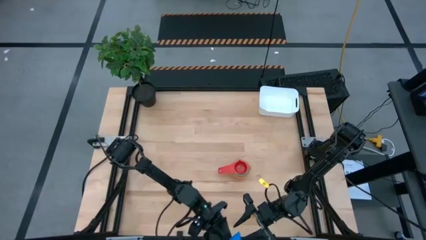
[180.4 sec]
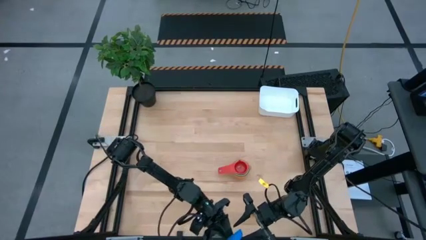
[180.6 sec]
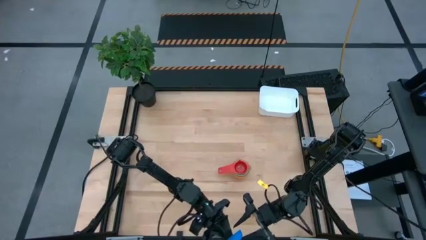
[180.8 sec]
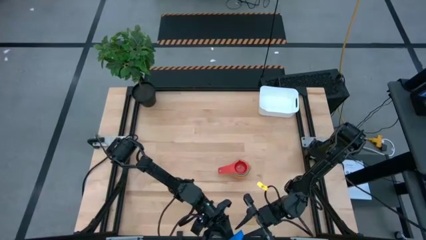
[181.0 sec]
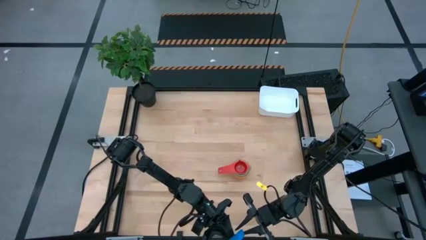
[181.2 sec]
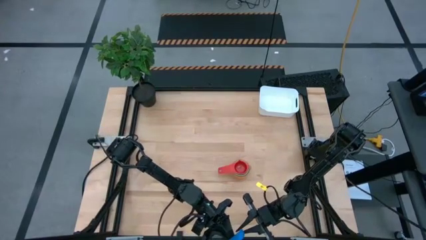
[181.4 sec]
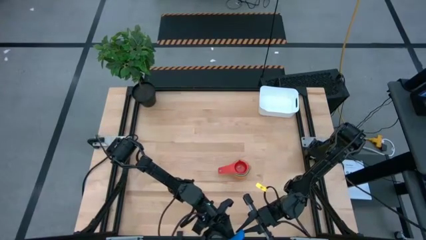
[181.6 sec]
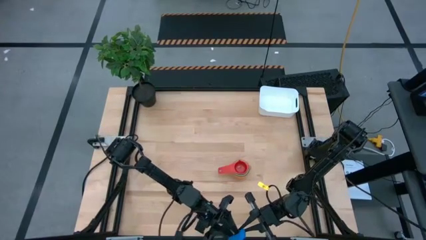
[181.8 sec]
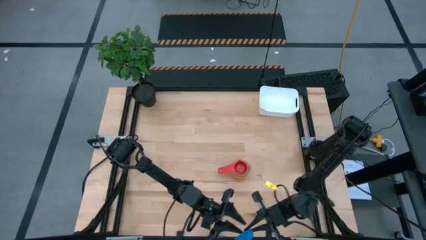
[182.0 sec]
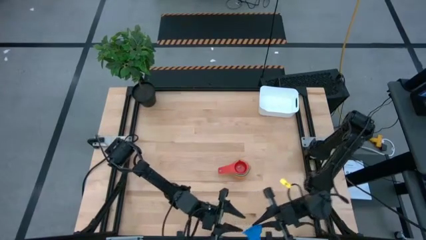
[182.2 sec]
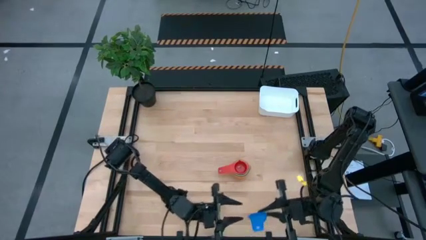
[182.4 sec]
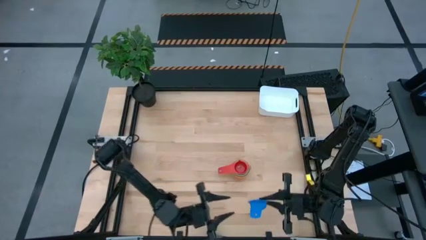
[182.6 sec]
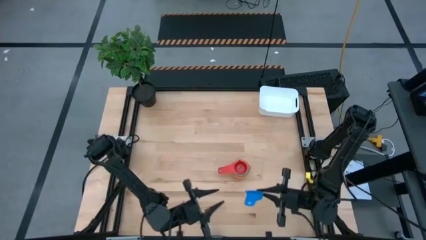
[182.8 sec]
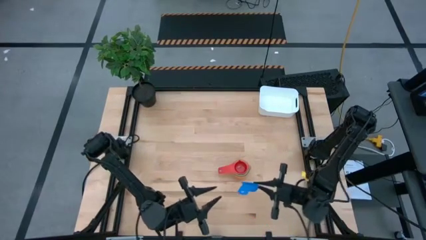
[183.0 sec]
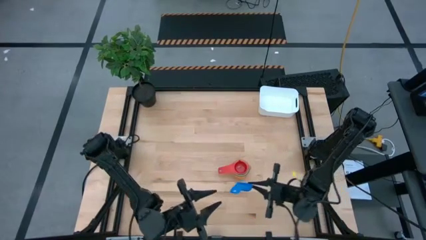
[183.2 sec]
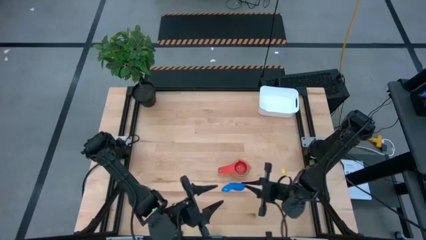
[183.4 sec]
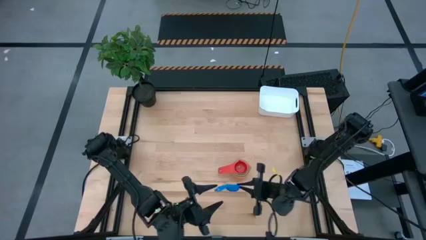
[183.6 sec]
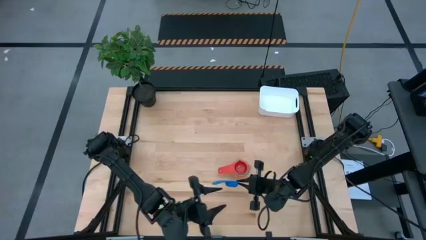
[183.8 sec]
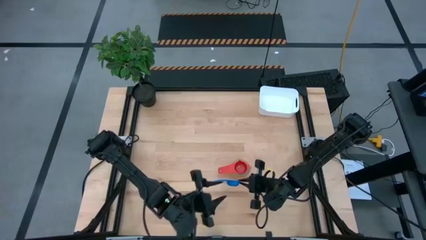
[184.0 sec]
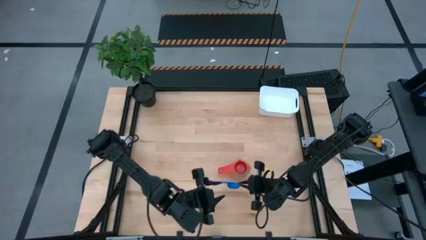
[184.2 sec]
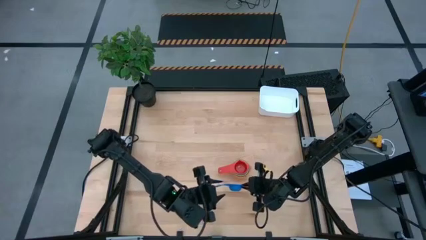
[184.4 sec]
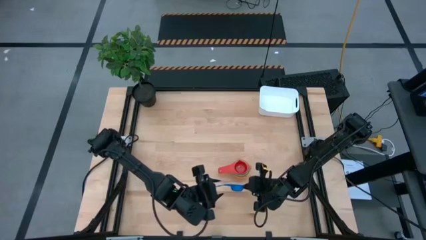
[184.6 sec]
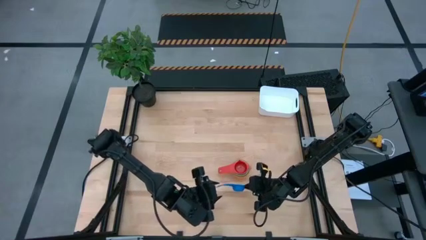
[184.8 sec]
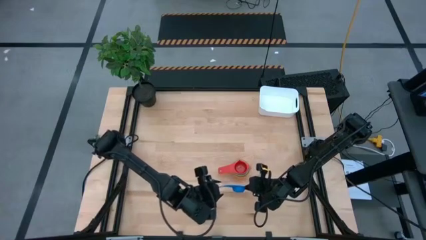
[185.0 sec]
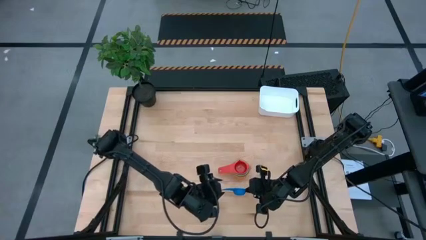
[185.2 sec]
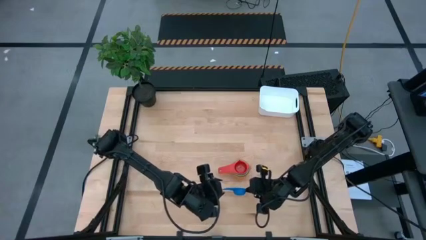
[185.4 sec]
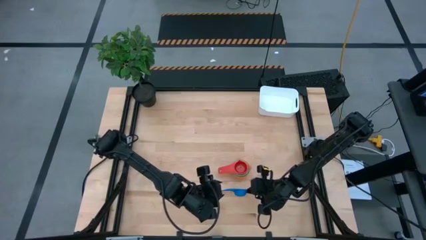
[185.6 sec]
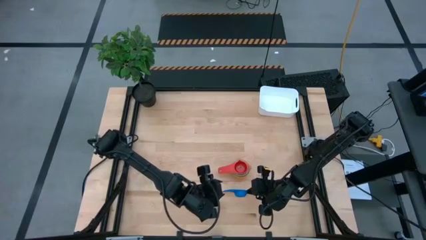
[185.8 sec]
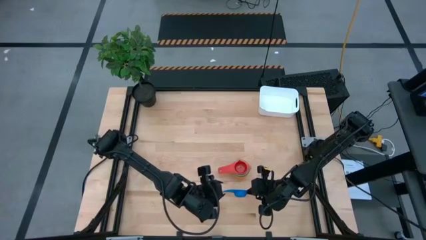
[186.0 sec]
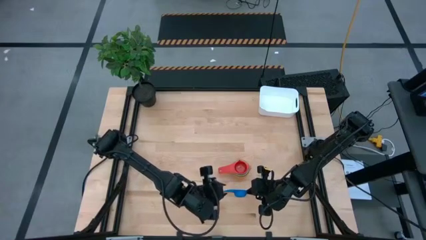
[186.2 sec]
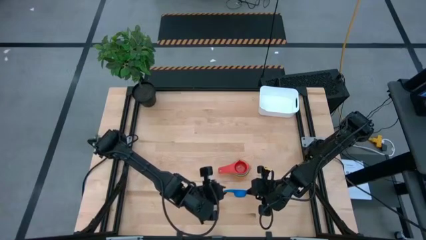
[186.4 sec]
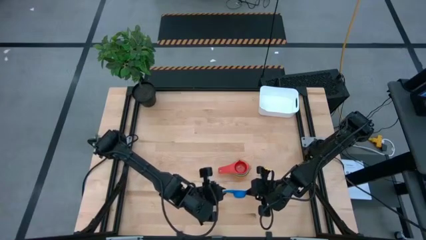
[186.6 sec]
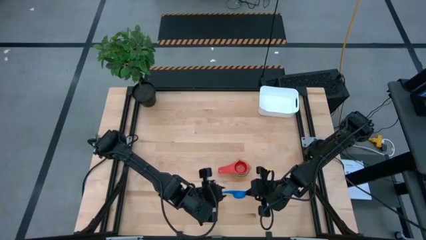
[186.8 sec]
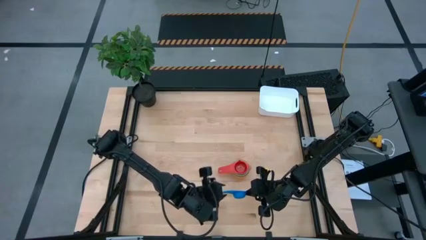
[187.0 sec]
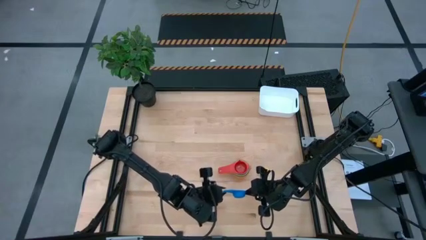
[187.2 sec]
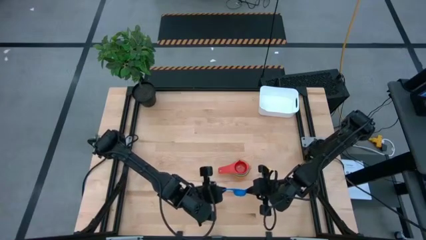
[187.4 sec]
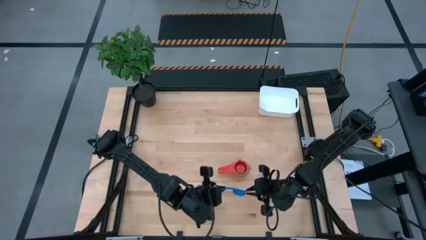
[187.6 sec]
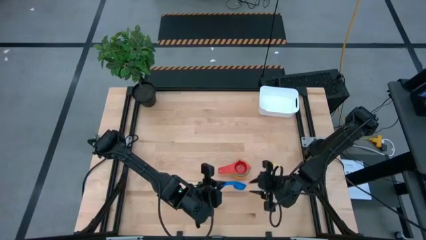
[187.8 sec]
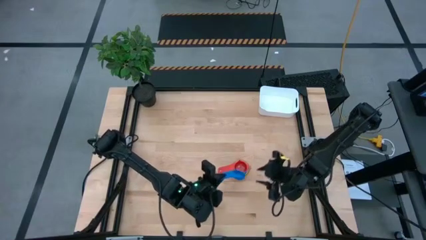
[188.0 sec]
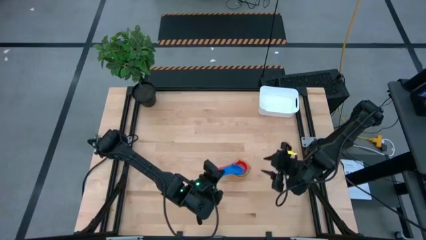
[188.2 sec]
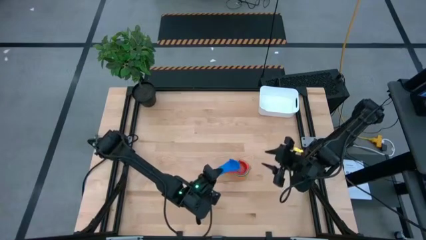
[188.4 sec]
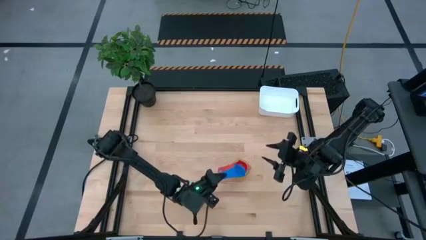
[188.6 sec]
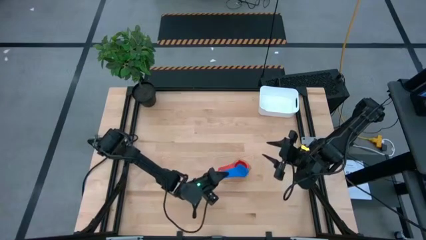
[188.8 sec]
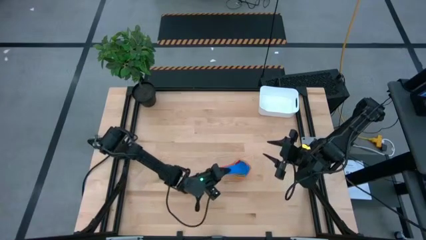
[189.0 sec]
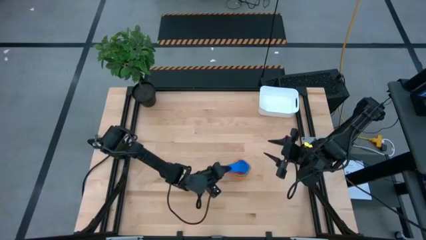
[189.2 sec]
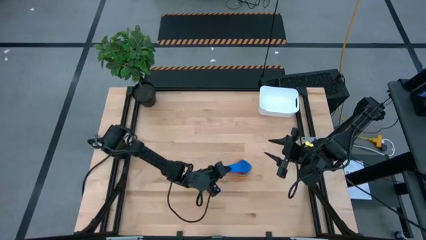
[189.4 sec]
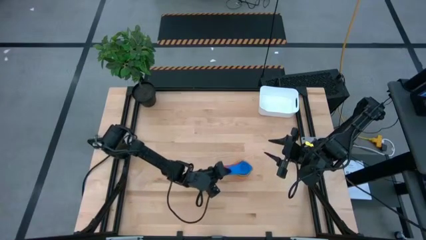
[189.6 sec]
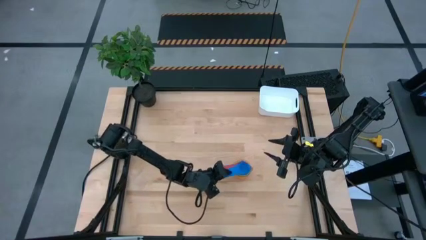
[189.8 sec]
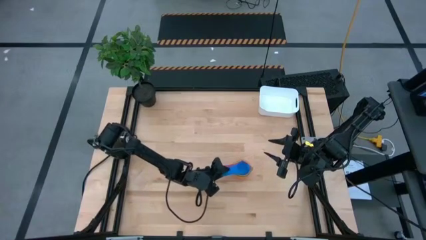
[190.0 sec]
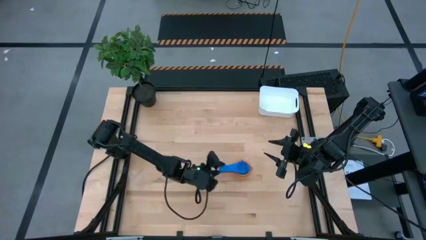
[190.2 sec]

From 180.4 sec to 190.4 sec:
Task: Nest measuring cups in basket
Stack the blue measuring on top of the red measuring cup

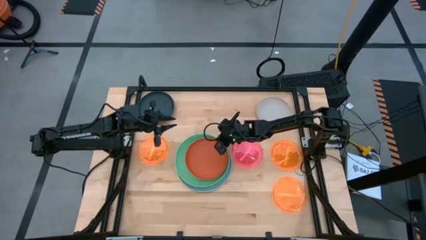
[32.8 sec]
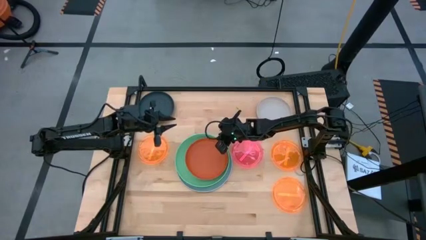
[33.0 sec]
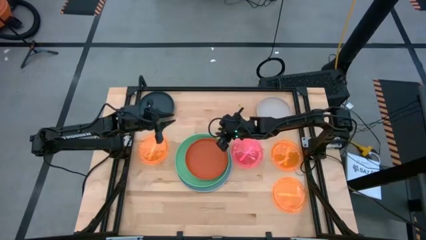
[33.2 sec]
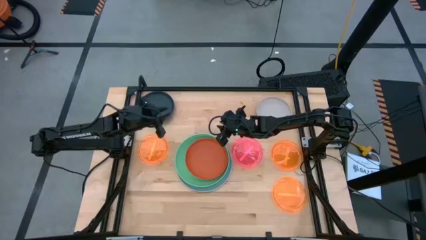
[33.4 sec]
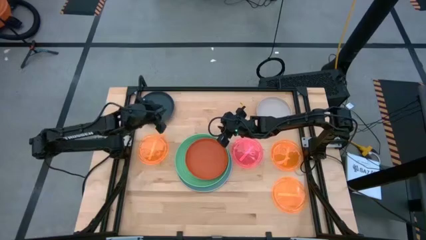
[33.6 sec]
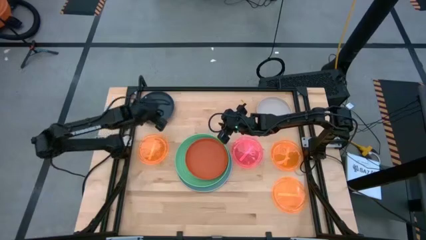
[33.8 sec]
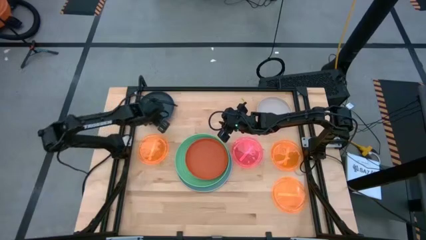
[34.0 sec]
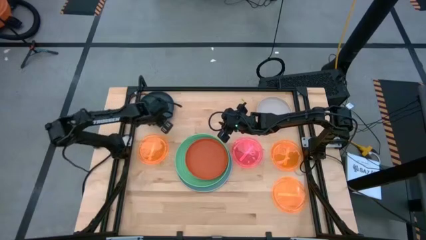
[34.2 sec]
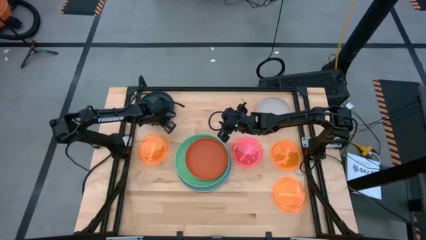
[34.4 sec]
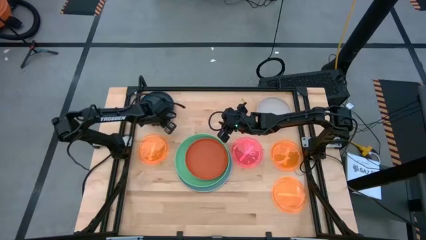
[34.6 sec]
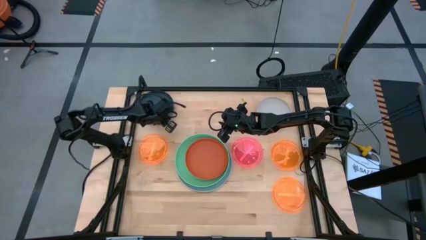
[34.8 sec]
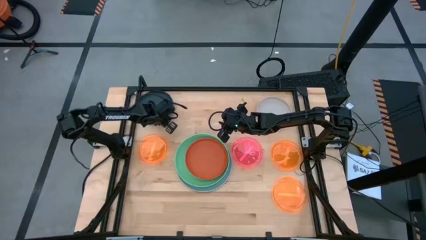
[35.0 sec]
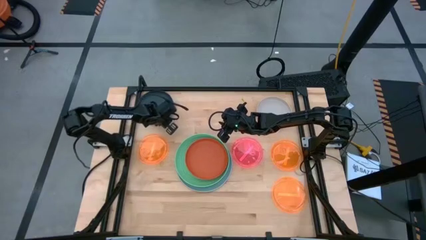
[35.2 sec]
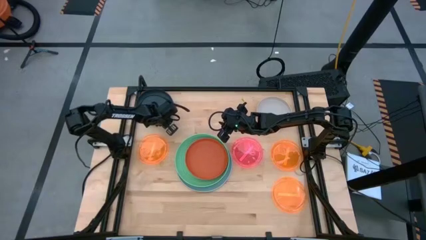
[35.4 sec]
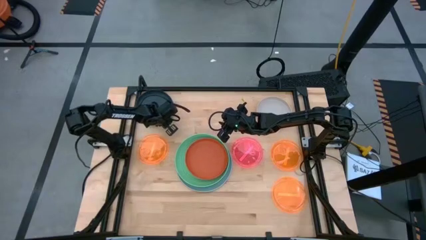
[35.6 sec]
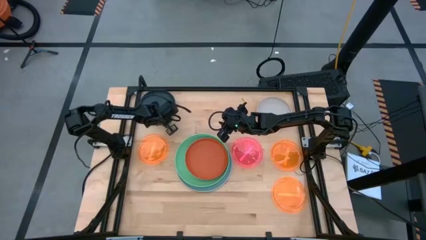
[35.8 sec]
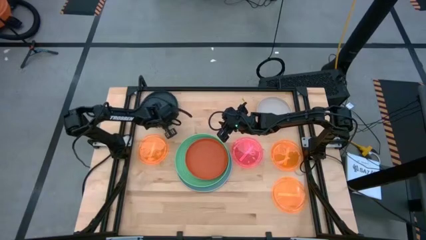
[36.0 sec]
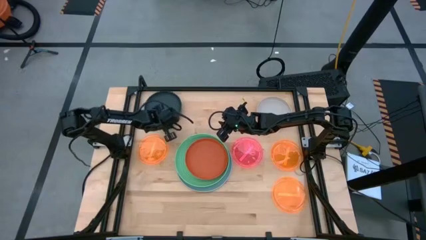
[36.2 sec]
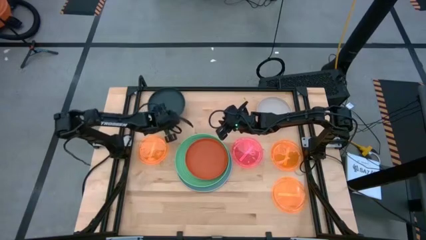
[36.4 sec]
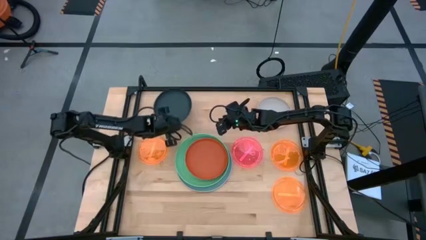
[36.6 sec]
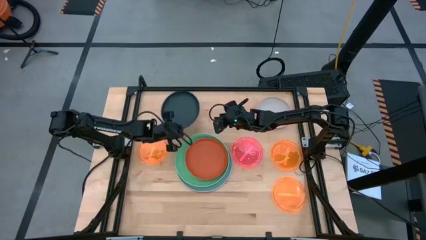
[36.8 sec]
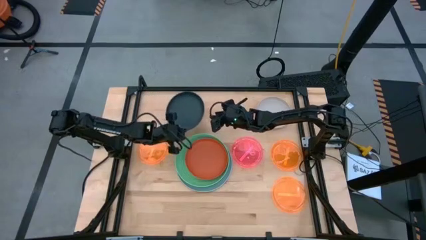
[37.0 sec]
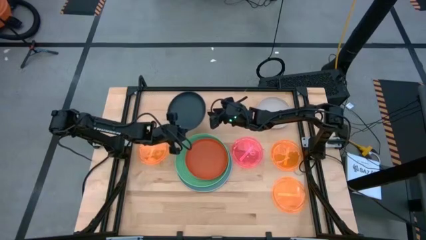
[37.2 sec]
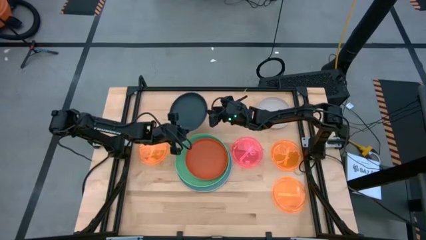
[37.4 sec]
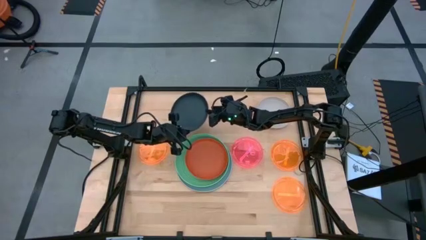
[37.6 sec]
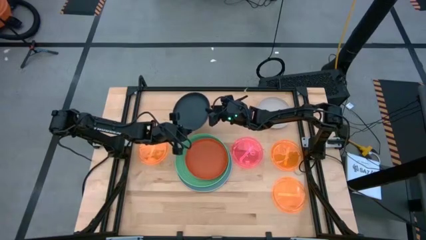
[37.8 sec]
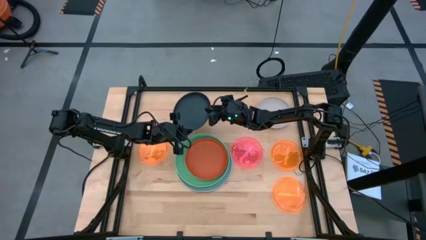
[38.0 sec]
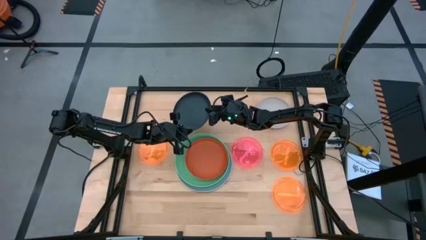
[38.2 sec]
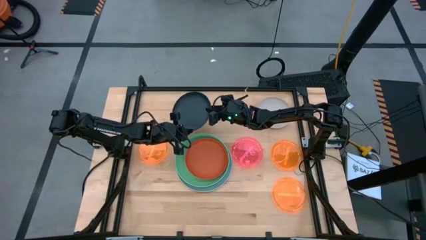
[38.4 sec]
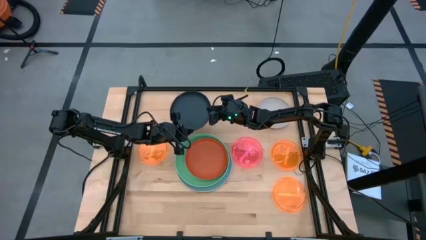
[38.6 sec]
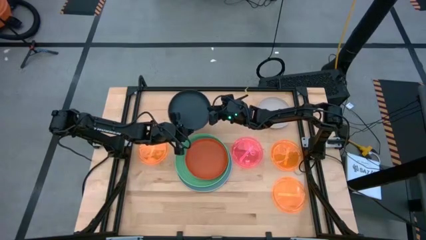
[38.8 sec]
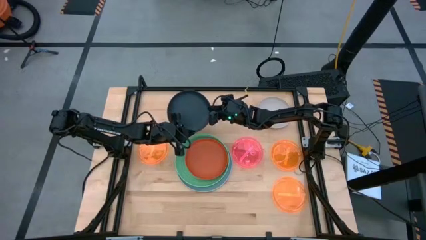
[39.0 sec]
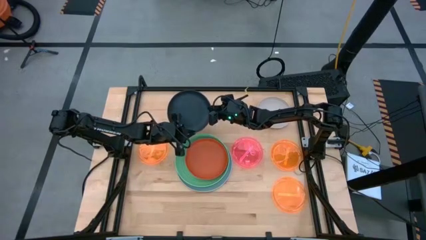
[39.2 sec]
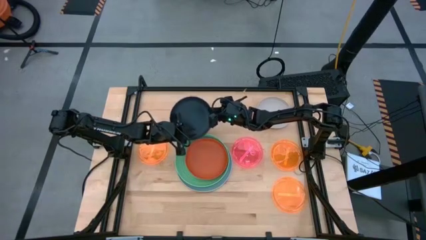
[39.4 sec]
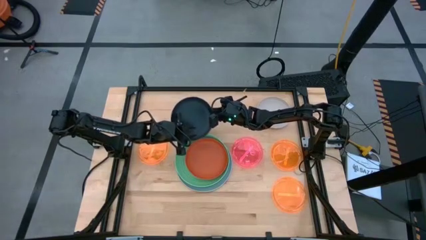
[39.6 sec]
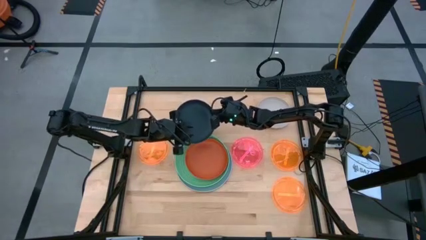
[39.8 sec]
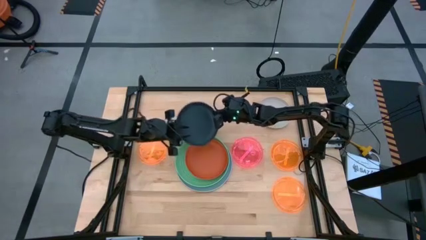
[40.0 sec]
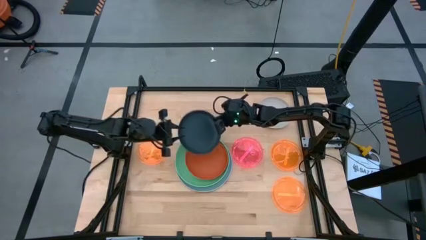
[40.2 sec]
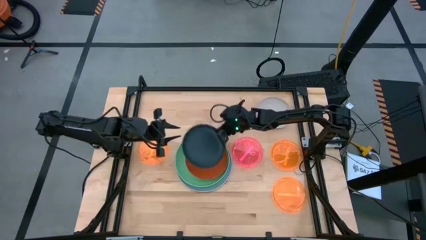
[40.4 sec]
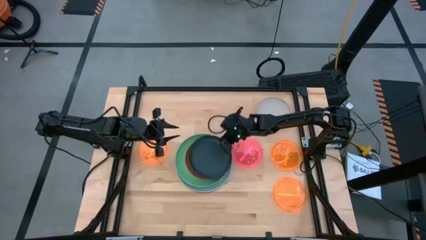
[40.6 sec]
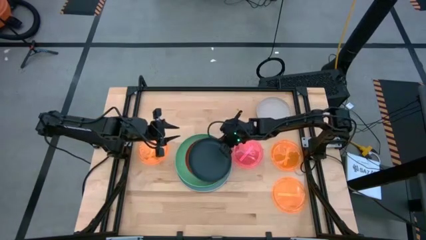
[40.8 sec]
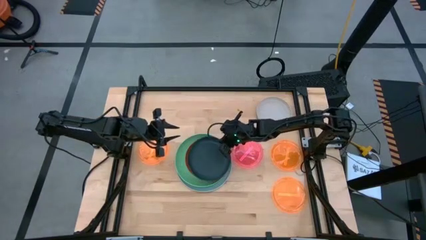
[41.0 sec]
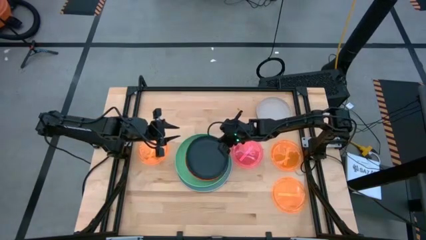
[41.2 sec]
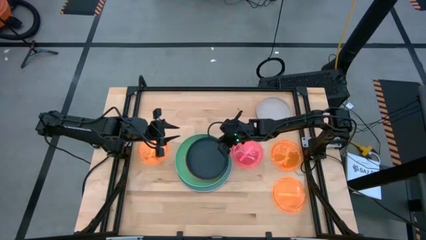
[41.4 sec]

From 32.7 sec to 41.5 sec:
Task: Stack plastic plates
Stack the dark blue plate on top of the orange plate
